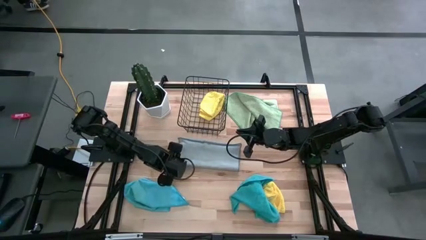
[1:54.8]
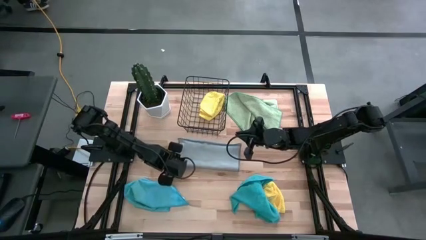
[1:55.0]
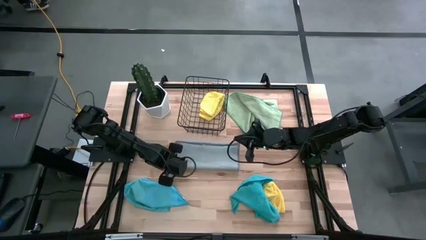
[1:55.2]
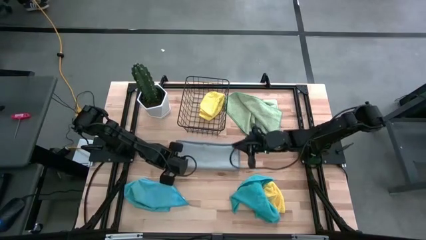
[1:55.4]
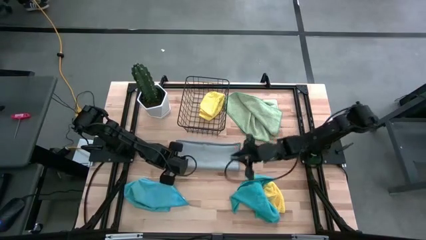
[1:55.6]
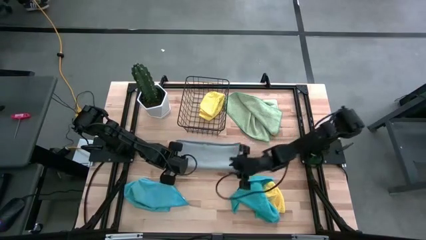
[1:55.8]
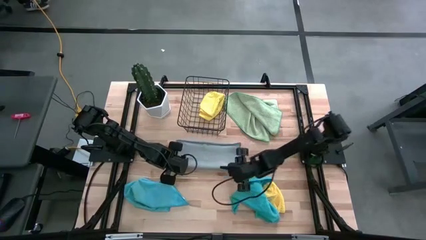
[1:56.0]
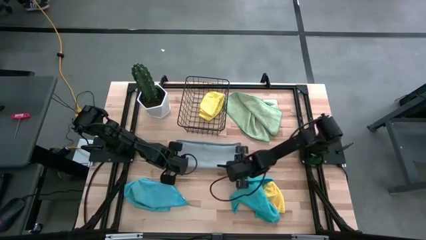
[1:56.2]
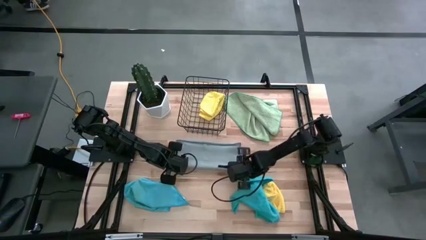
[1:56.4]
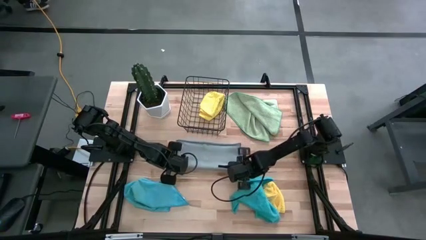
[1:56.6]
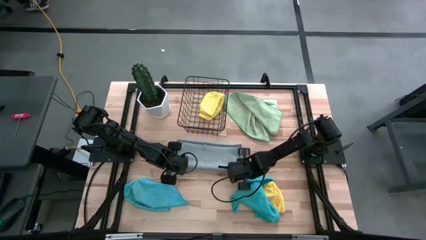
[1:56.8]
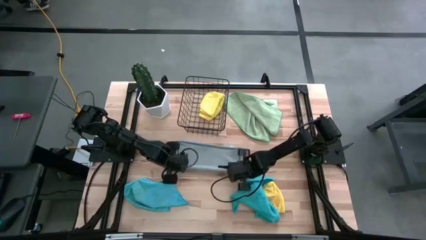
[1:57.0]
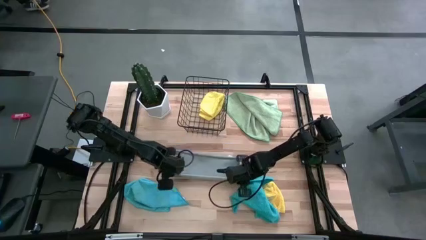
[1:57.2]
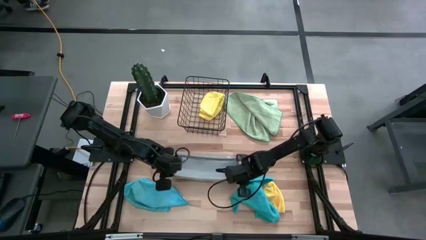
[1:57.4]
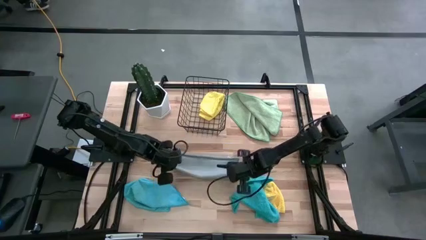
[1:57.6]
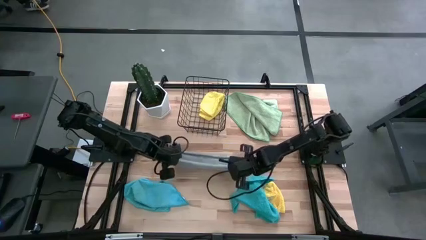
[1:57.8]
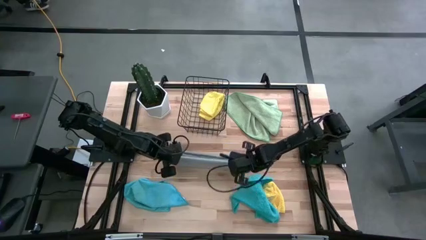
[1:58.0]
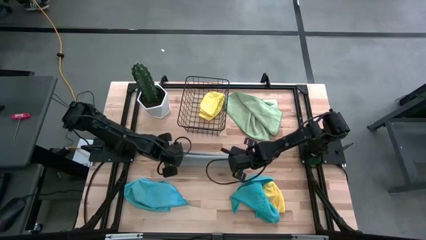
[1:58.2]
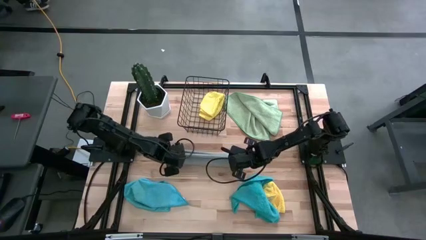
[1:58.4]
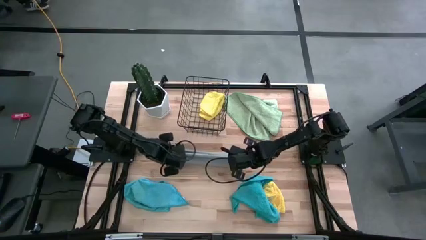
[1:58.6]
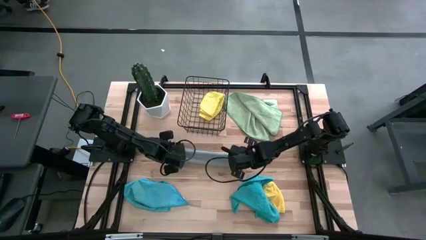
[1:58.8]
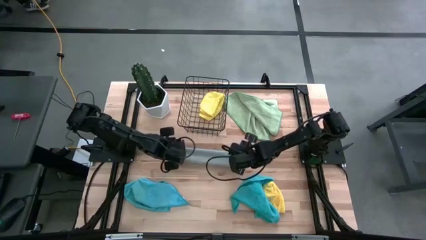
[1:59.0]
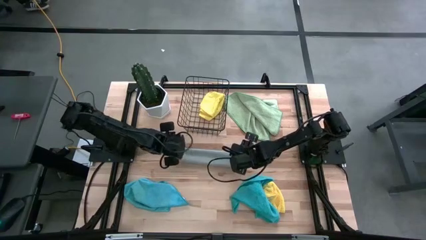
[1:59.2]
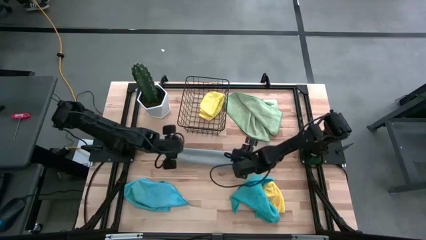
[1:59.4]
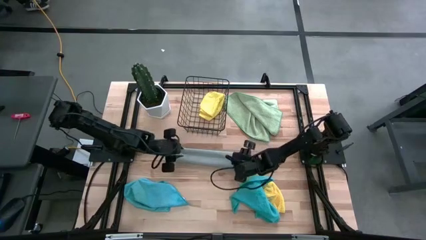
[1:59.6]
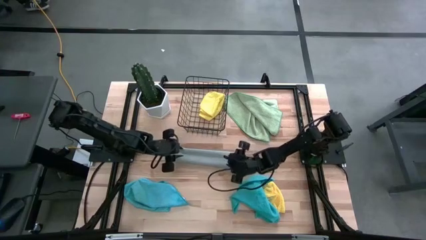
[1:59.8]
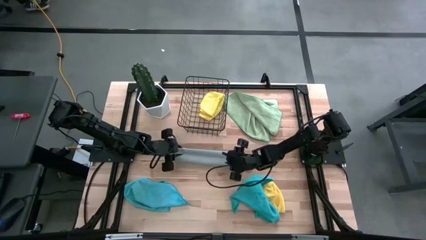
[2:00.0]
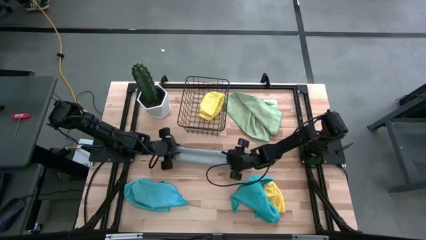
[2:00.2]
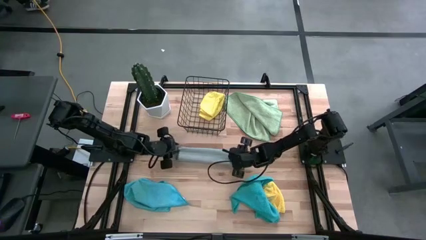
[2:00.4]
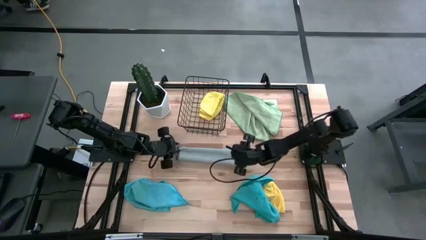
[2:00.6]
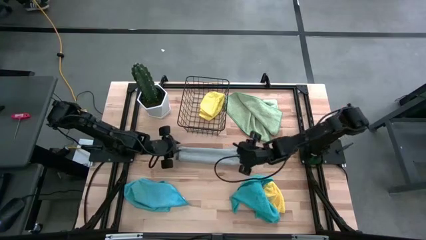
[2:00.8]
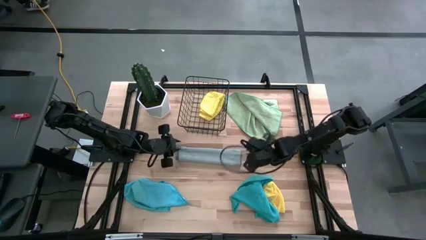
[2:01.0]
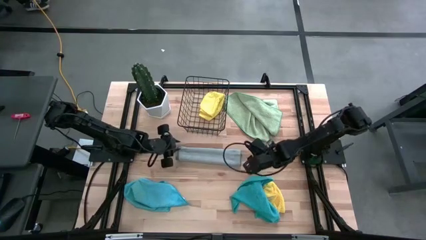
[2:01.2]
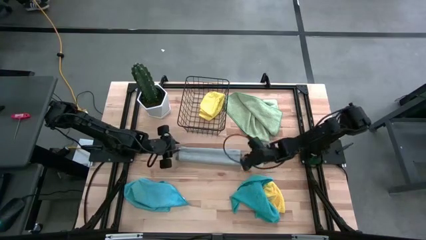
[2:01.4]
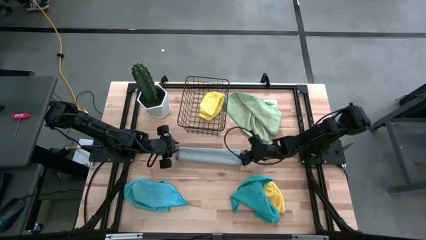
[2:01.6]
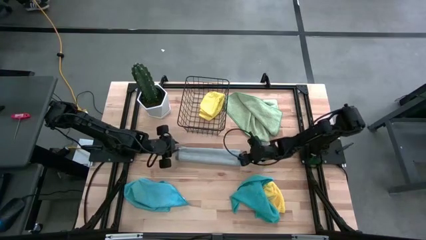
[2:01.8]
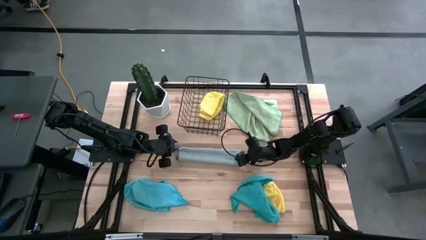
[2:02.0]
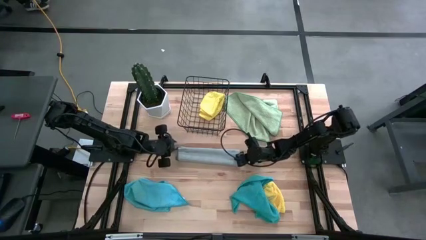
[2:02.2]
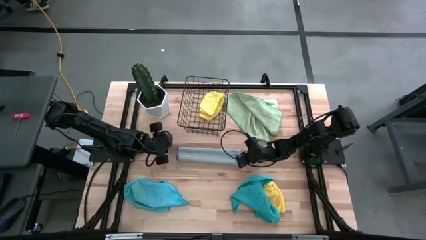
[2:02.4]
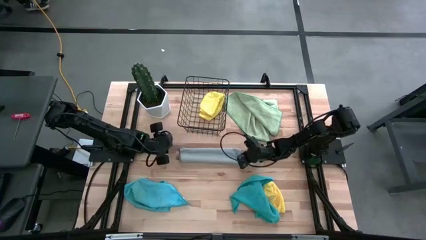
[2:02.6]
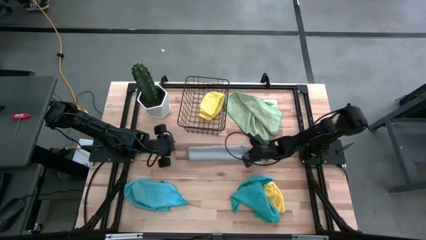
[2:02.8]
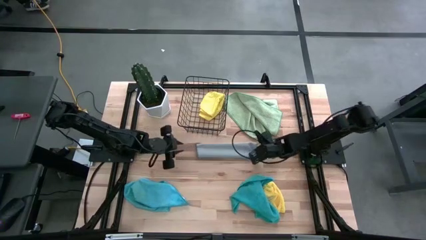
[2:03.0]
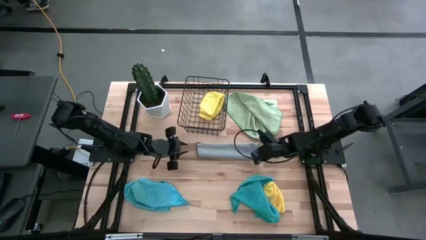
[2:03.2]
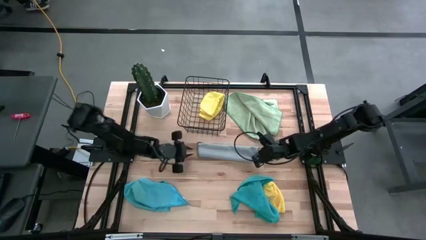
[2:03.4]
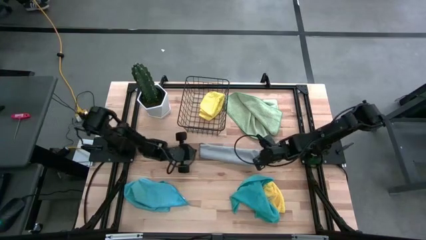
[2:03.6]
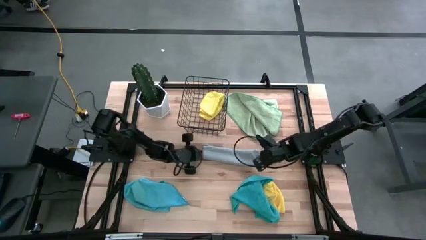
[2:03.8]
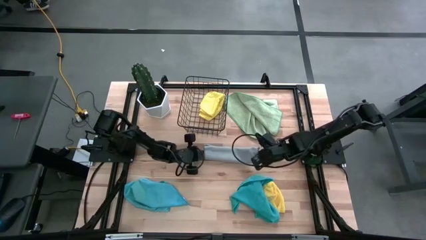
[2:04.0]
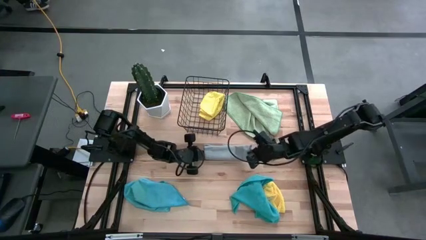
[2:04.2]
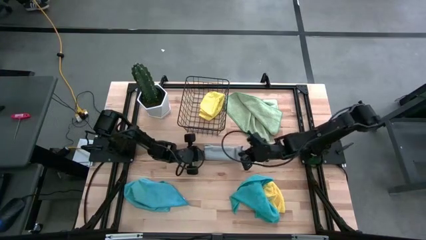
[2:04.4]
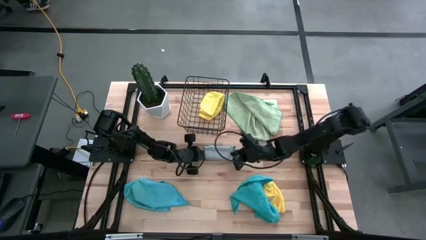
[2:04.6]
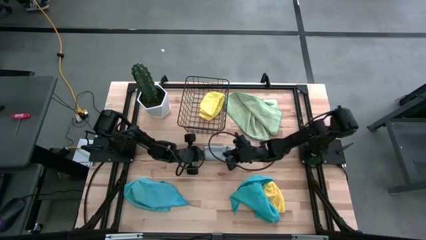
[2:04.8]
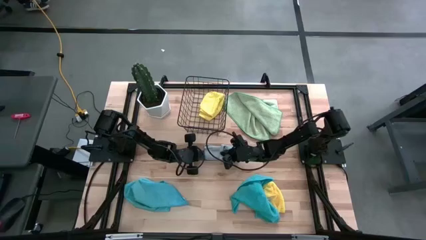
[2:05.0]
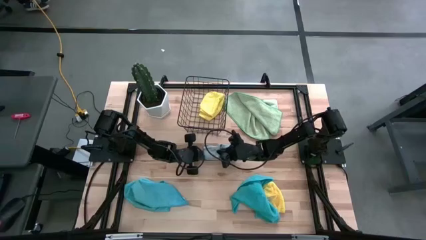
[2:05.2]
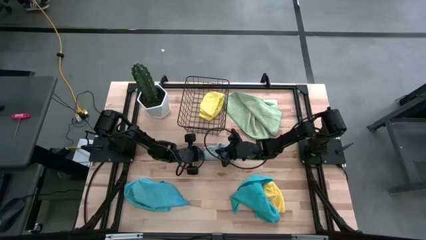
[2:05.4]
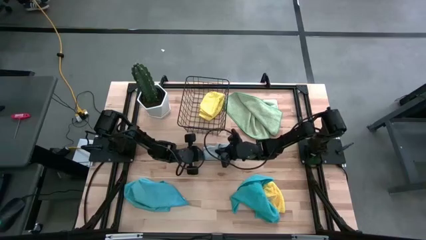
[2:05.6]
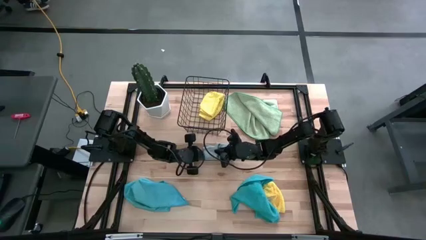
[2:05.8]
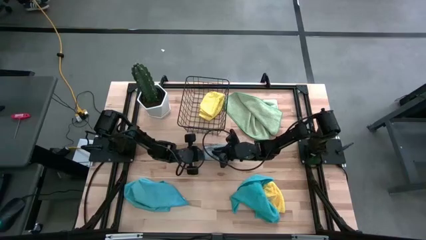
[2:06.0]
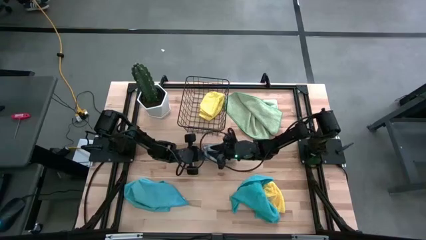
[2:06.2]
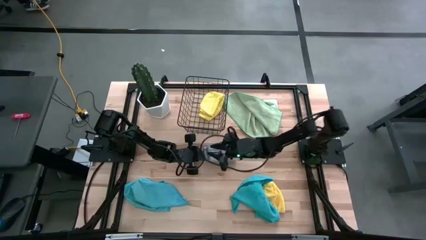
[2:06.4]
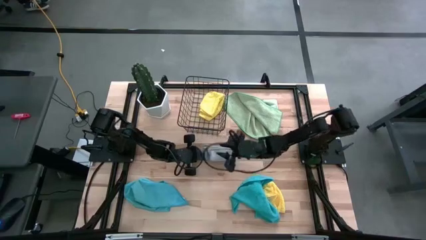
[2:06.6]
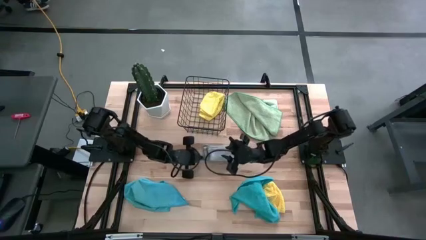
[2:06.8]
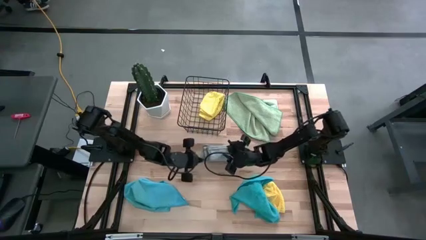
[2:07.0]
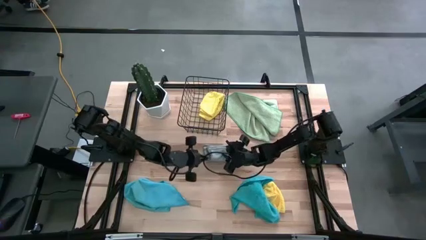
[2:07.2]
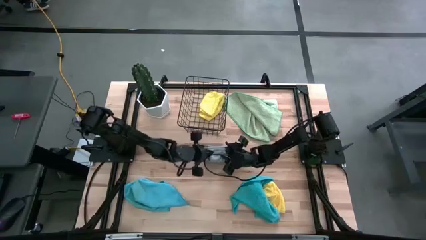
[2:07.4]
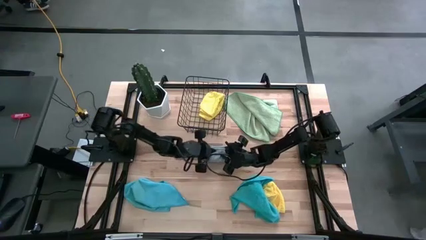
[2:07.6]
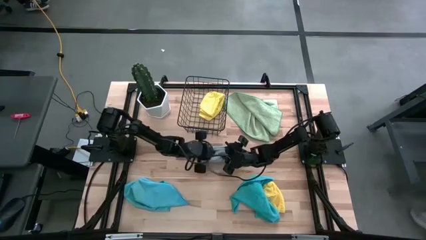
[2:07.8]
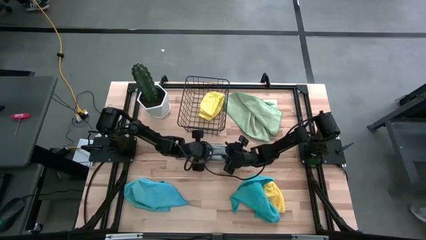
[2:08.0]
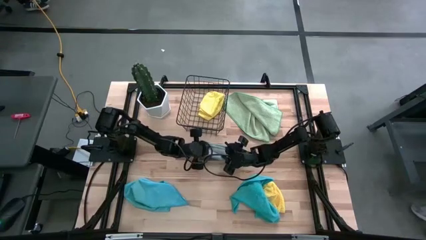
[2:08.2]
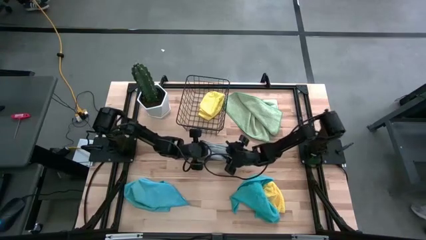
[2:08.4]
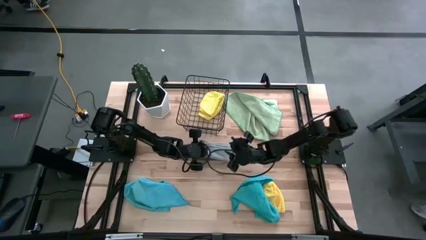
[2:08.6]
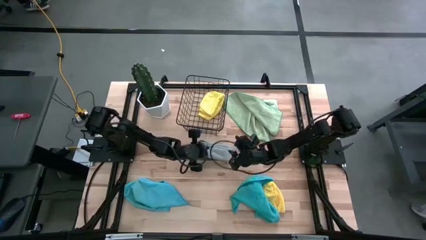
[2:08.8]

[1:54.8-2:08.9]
Task: Fold microfiber towels
Fold the gray microfiber cloth

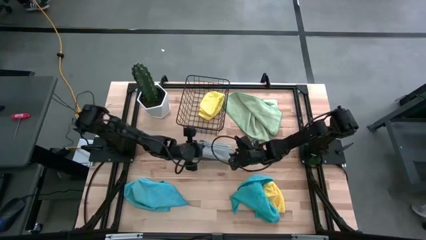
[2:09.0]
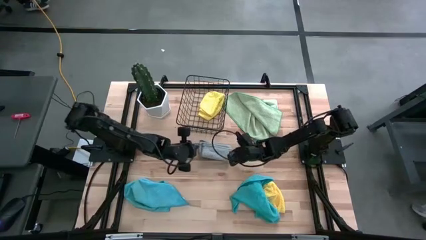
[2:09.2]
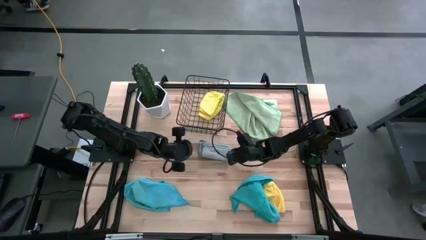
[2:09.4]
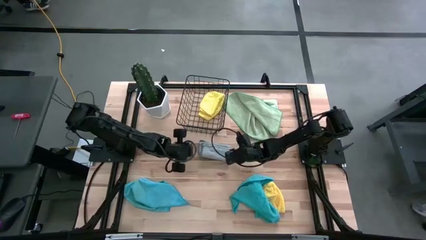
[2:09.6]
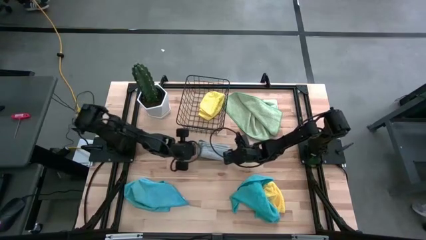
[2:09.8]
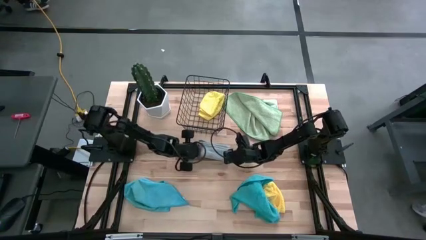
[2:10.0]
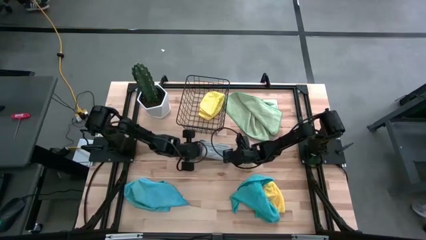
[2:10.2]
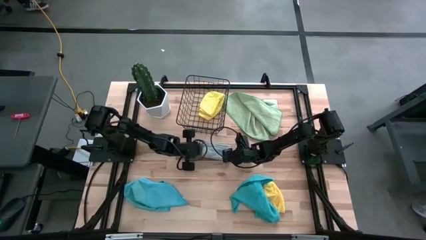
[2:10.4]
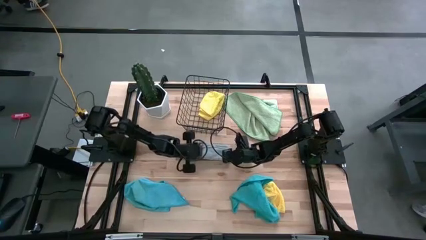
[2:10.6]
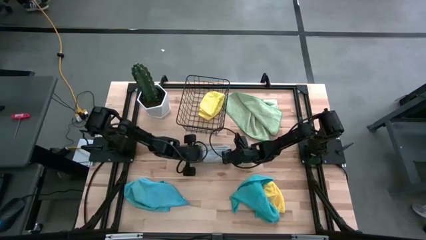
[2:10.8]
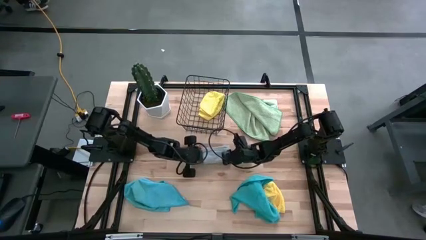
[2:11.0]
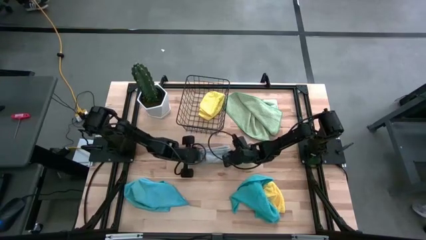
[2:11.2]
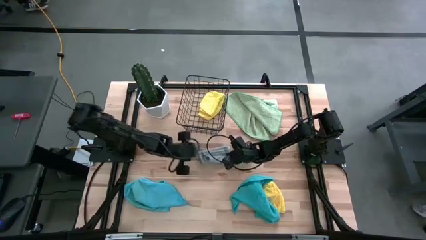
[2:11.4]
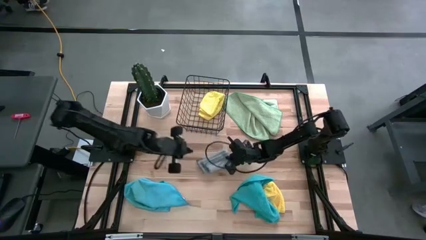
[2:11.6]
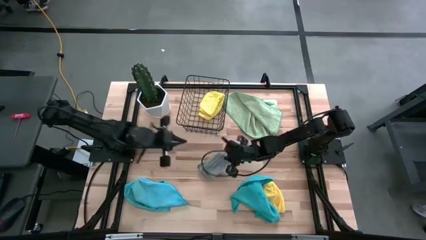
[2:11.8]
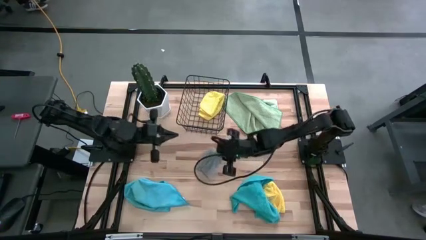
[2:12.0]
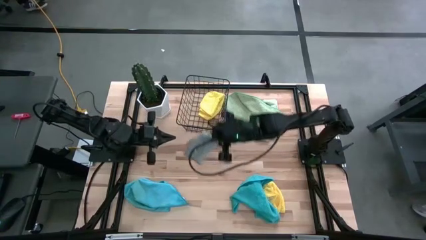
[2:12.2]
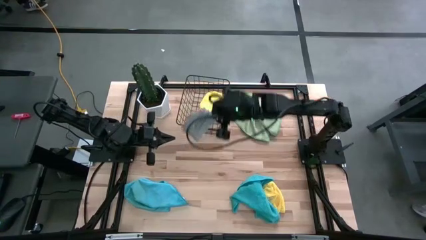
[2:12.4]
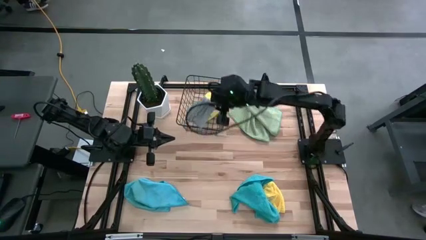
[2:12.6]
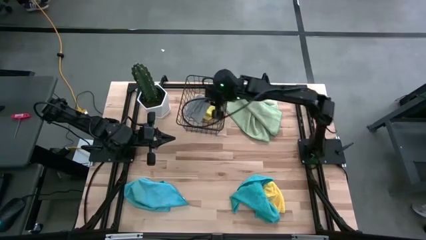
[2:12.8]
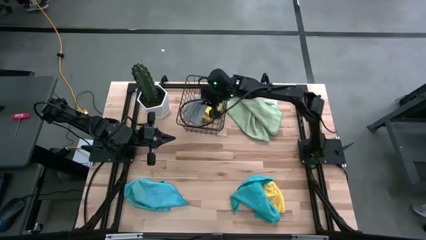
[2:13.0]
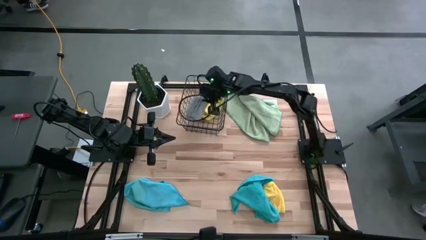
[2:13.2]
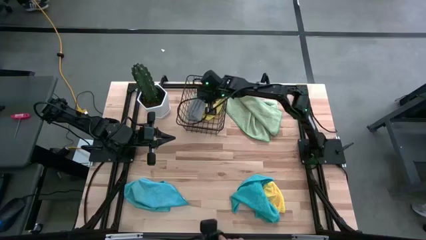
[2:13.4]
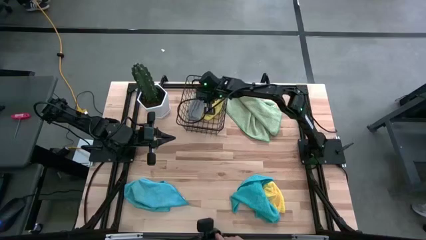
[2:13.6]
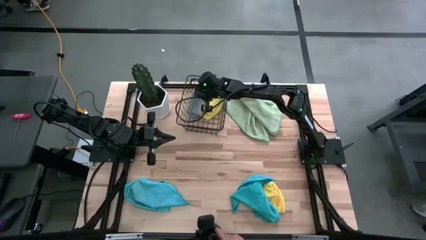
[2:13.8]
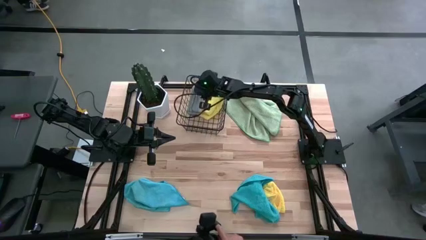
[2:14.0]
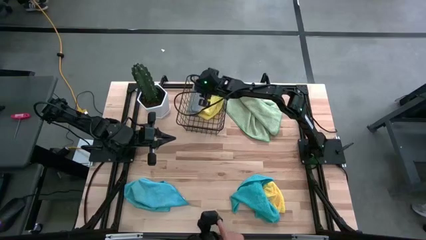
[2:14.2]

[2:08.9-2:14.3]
Put the gray microfiber cloth into the black wire basket
